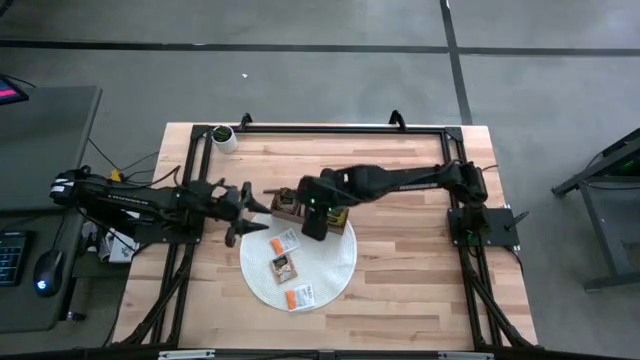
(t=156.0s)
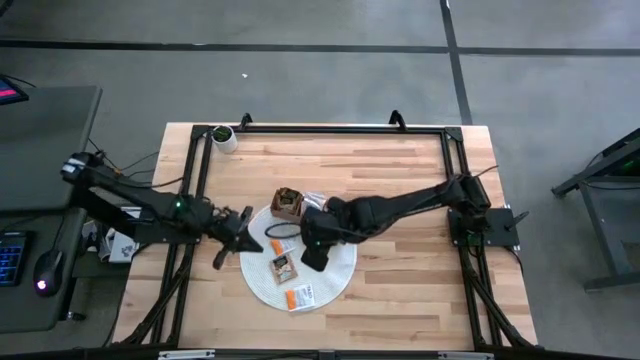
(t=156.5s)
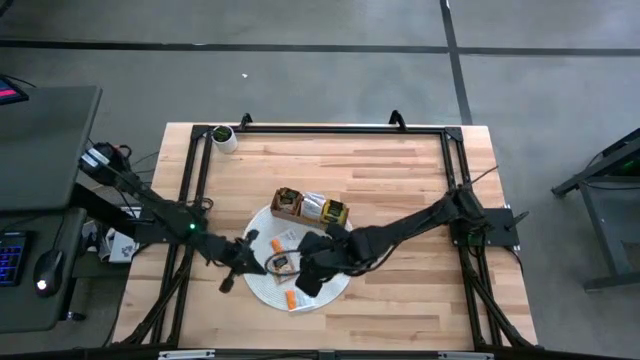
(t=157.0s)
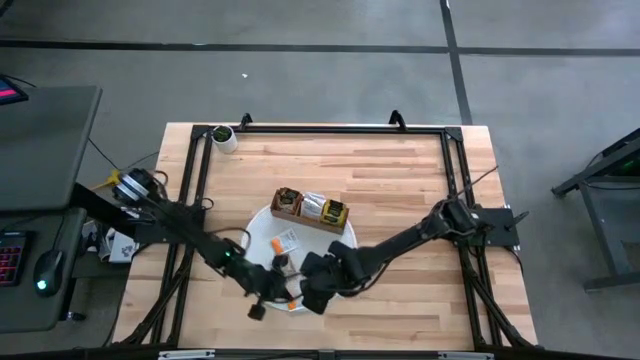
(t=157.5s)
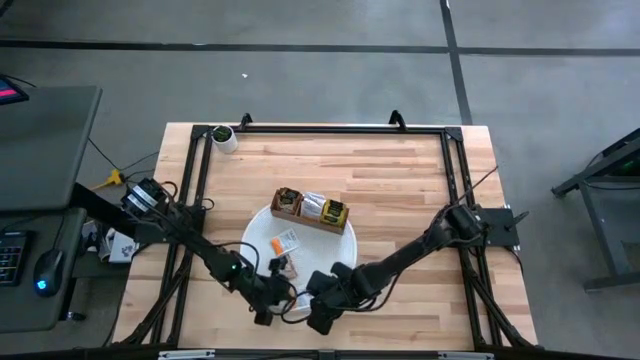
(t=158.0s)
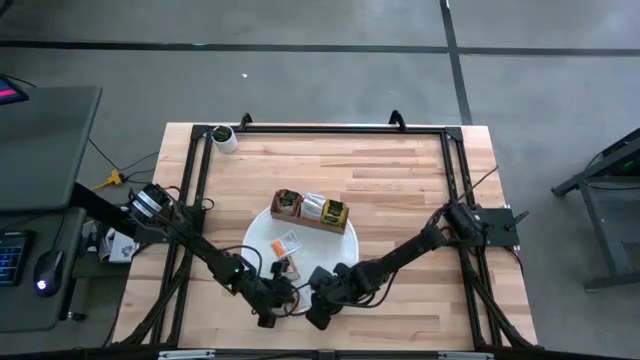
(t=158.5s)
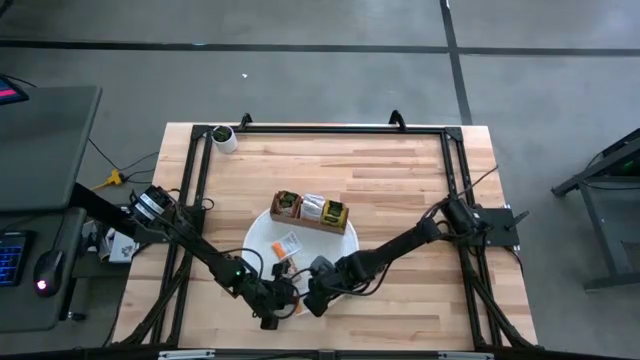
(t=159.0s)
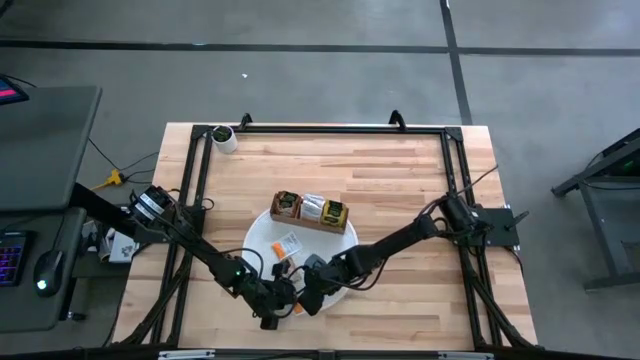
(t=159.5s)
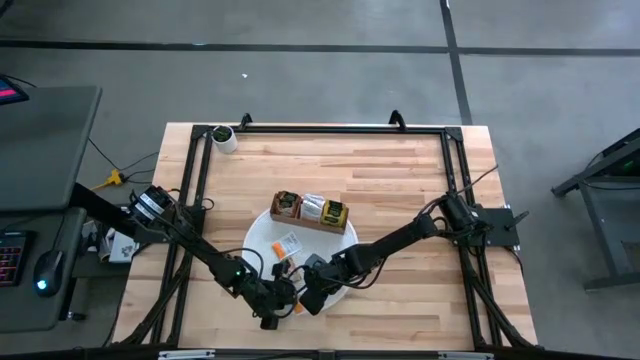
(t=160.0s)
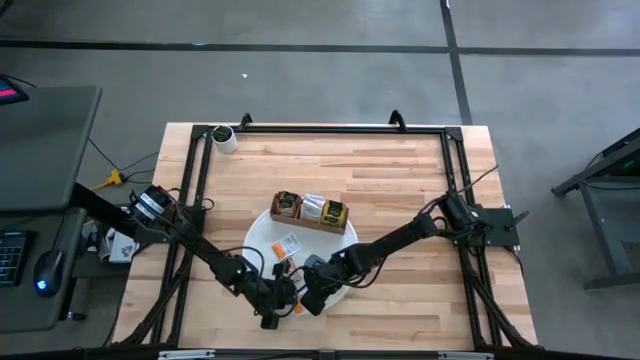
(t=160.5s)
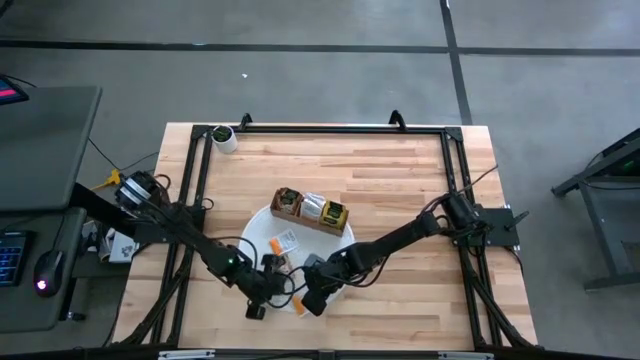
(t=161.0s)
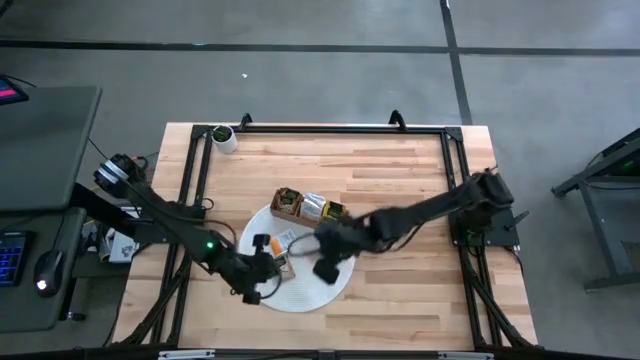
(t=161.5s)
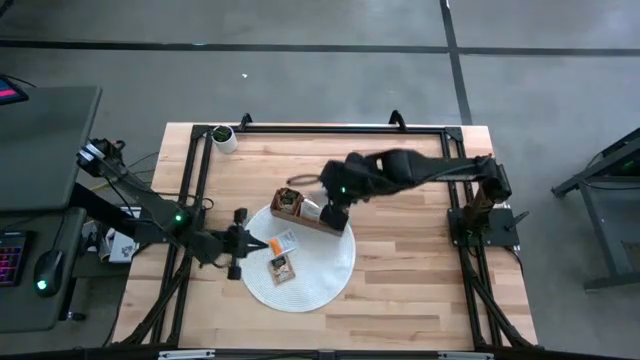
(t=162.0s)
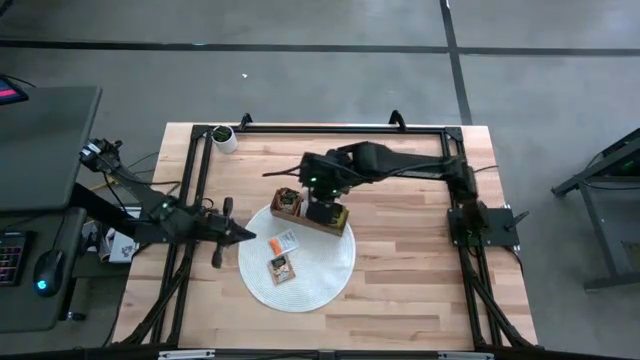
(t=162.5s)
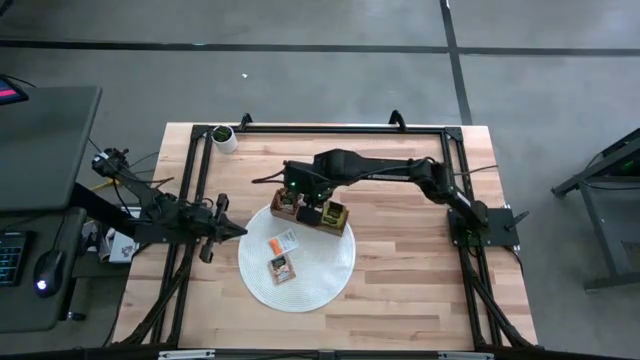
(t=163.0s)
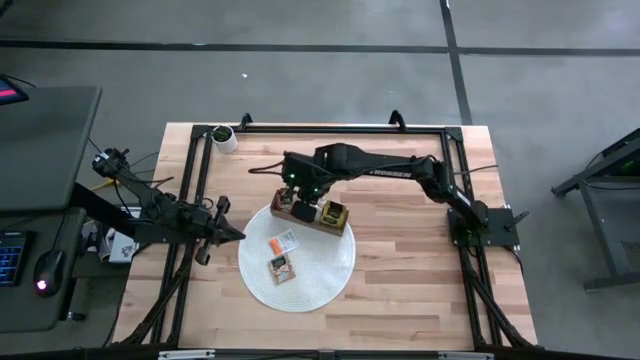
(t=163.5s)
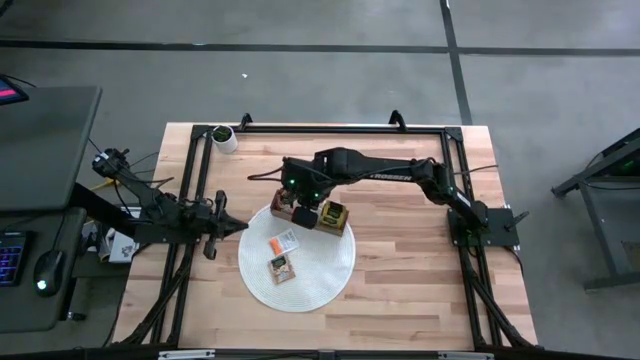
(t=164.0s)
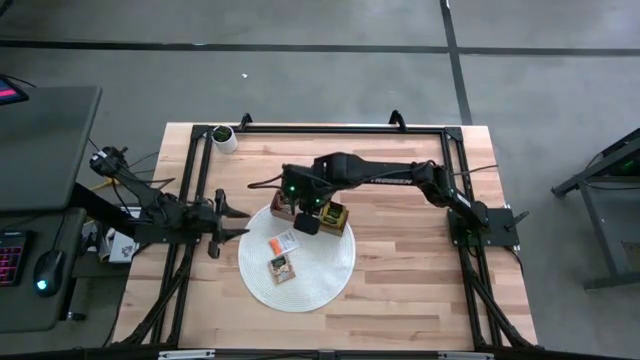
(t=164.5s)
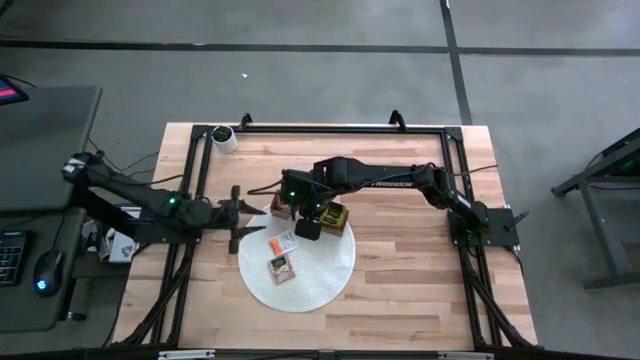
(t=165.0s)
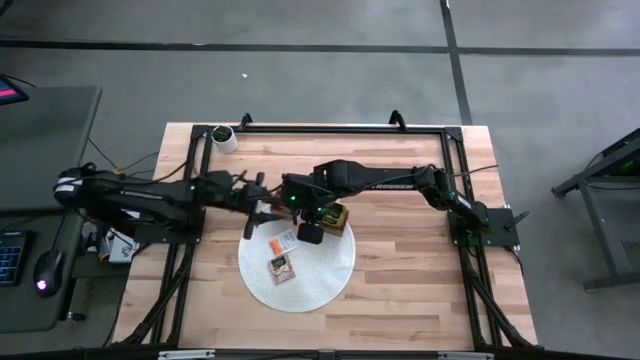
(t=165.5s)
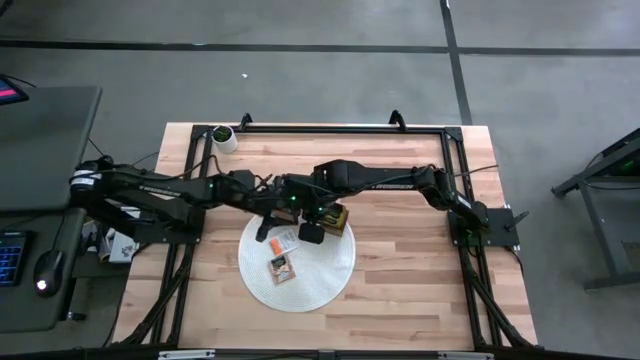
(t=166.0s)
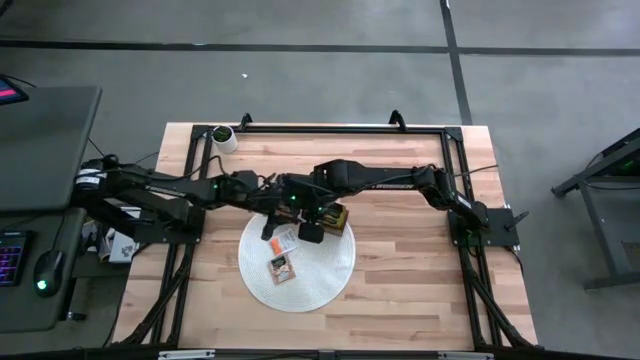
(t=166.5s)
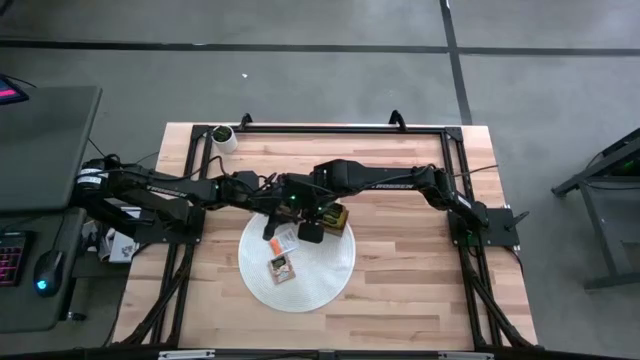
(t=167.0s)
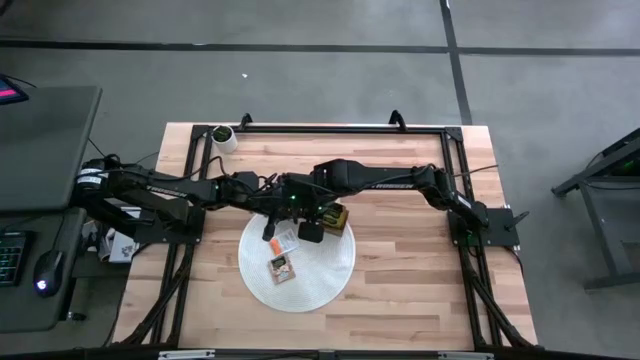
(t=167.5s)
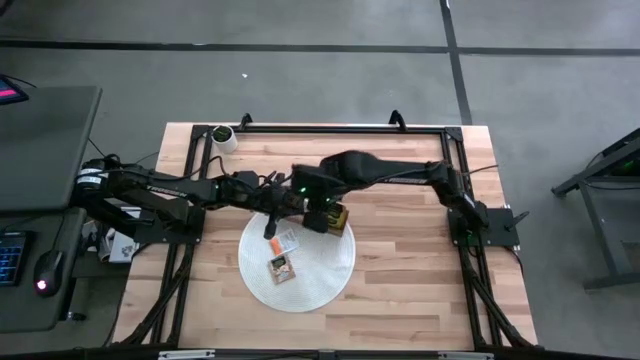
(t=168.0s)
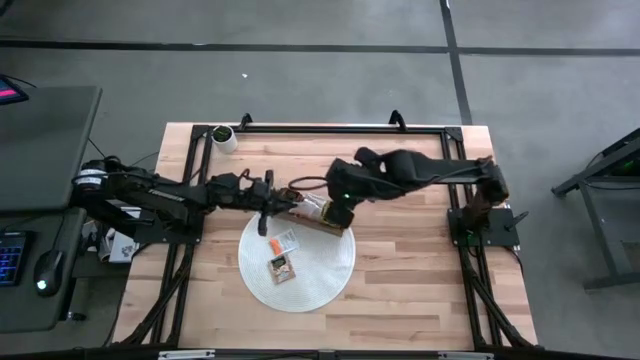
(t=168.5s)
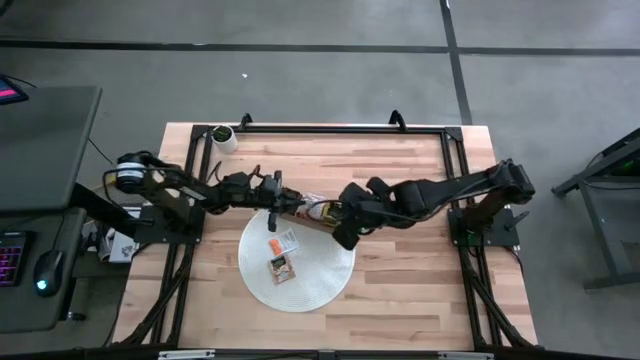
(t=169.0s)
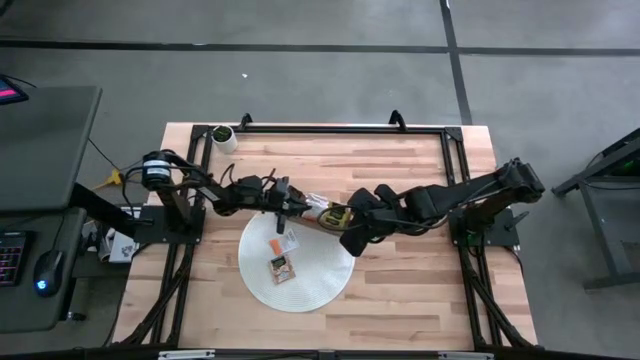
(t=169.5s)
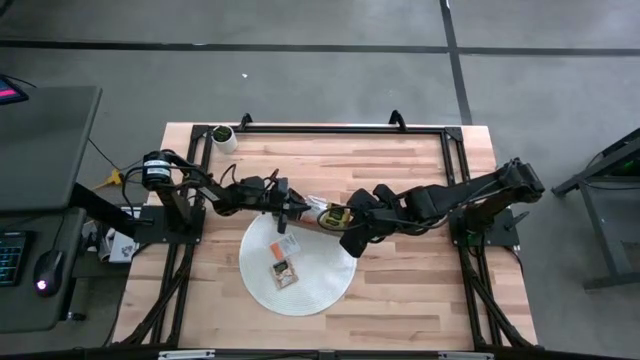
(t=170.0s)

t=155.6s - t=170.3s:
Task: Pick & Place Tea
Put the orange tea bag into the middle section of the wooden organizer

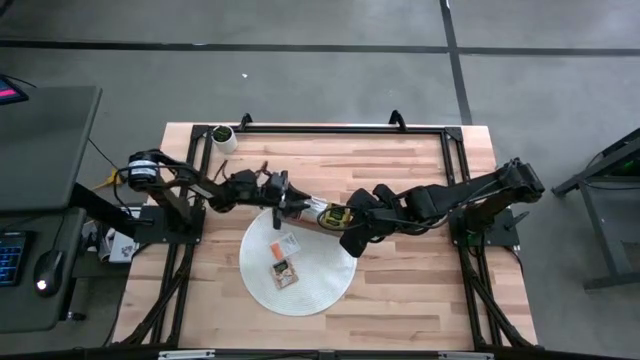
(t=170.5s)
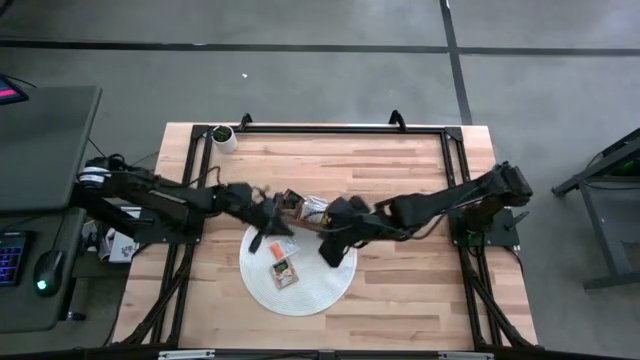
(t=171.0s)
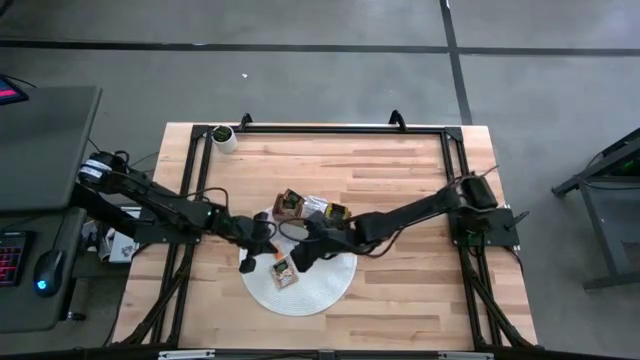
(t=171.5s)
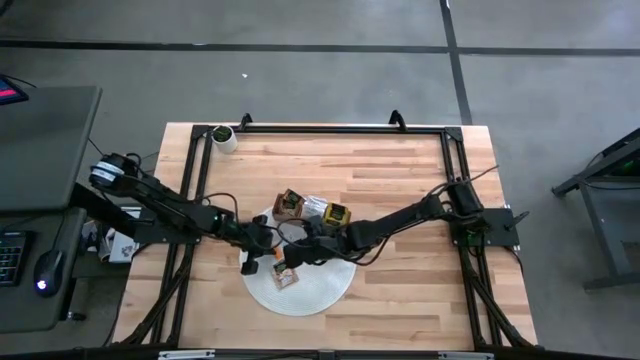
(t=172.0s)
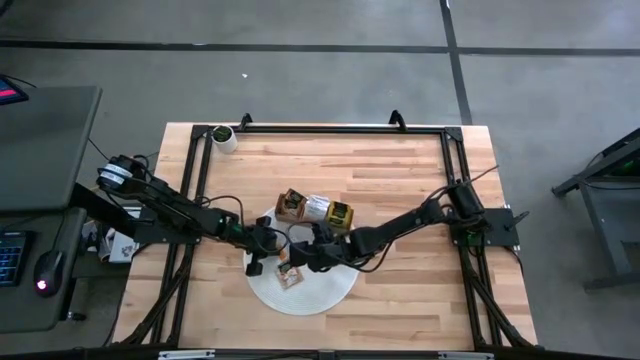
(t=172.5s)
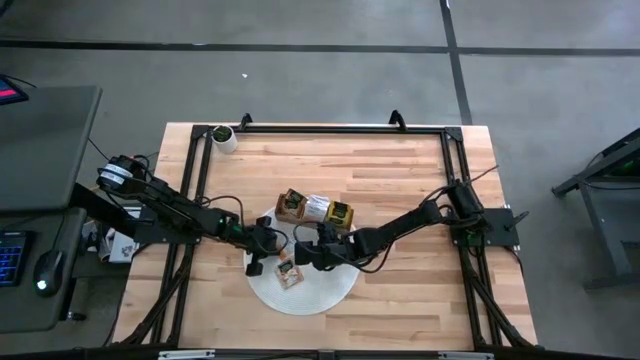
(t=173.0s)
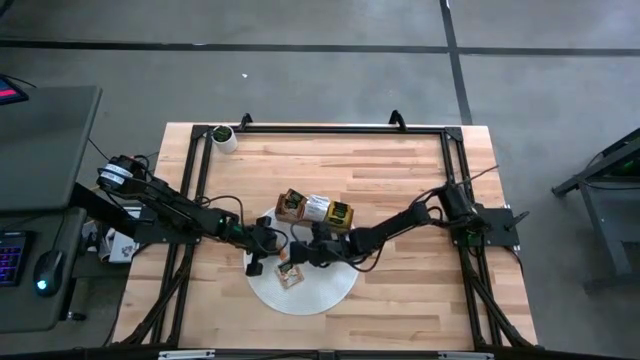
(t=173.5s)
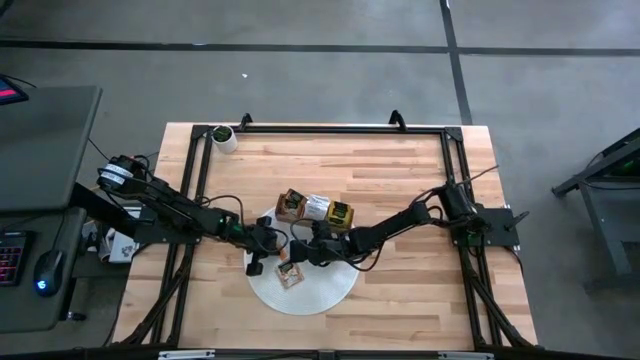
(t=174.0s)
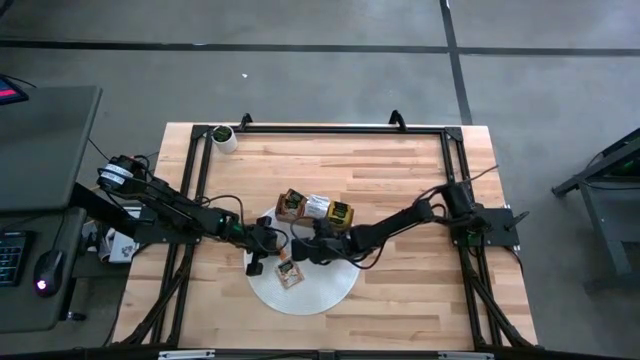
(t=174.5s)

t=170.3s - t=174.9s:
Put the orange tea bag into the middle section of the wooden organizer
